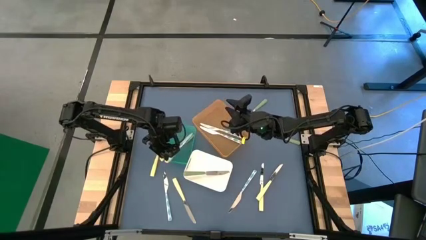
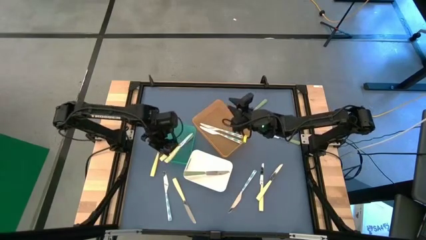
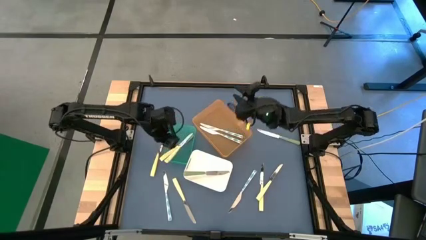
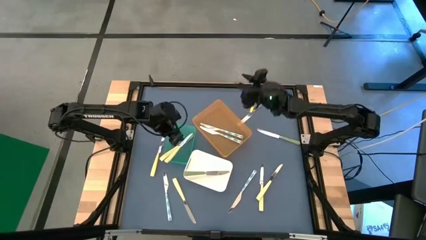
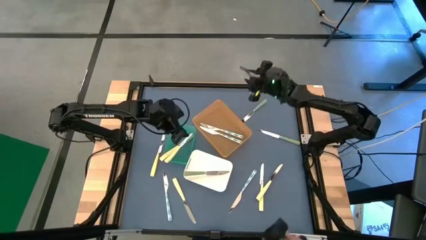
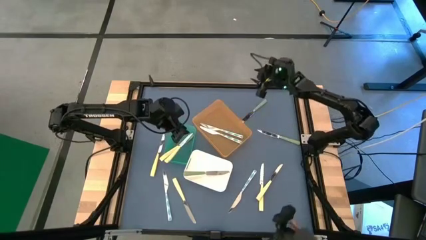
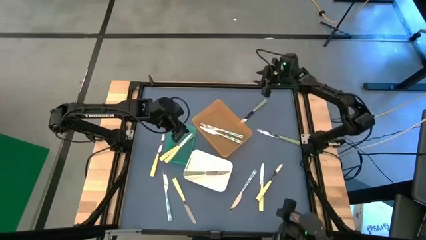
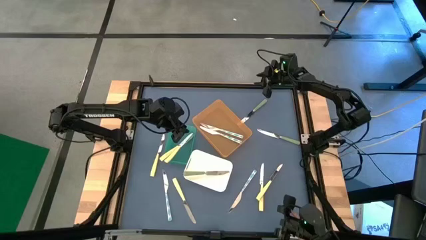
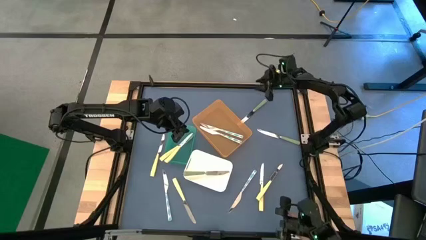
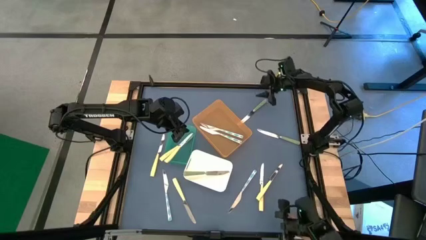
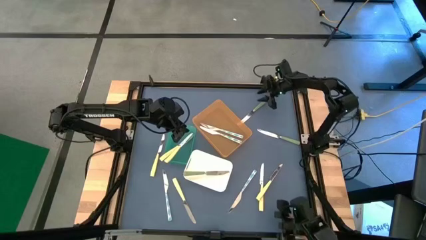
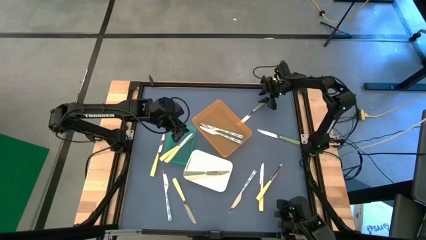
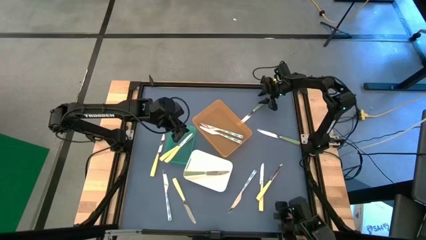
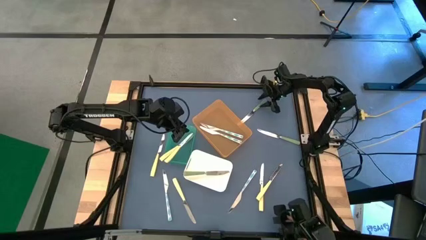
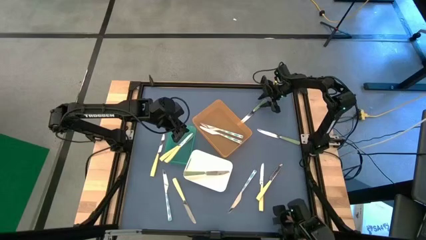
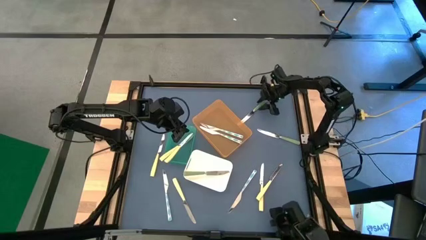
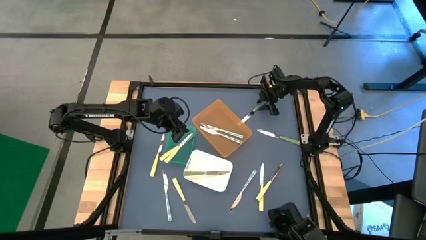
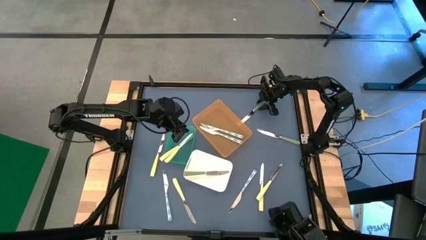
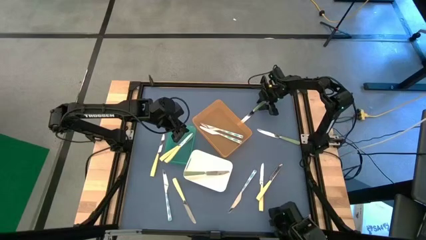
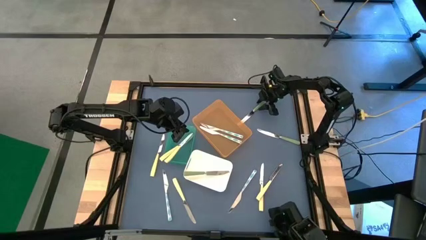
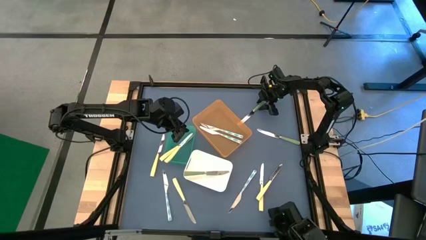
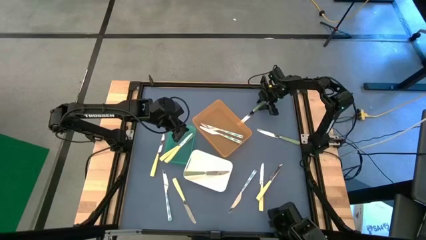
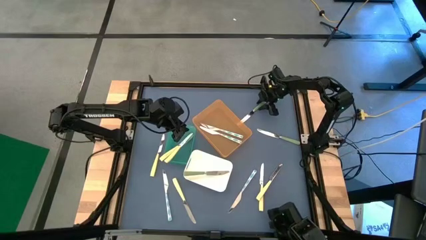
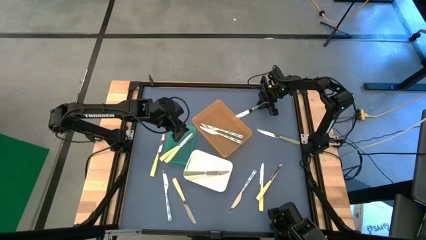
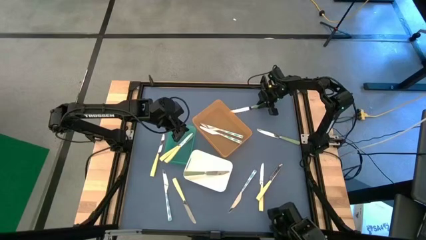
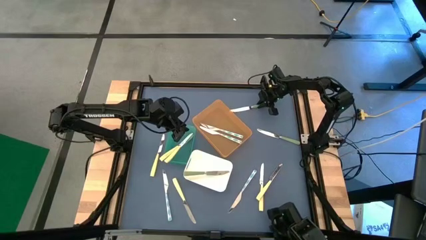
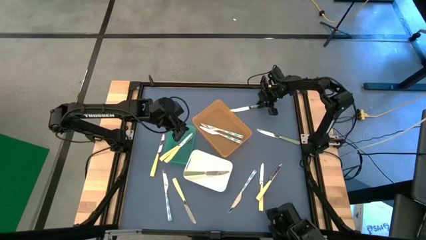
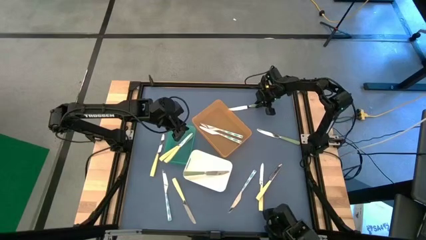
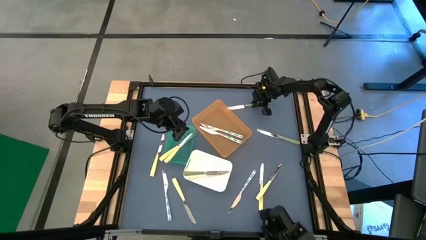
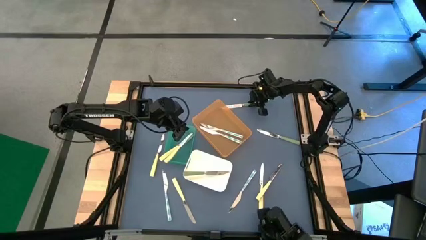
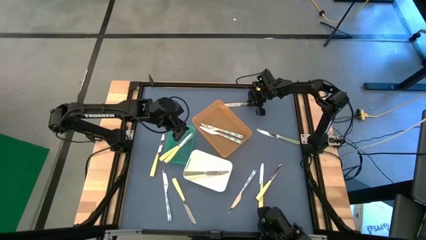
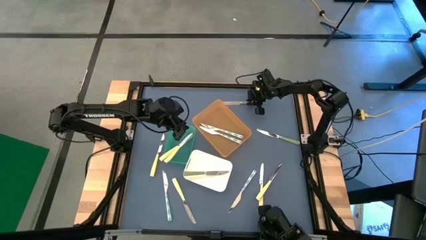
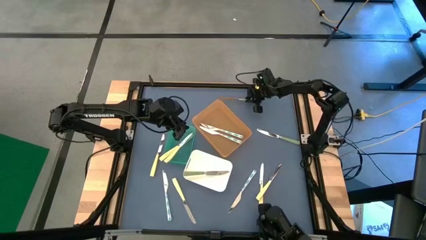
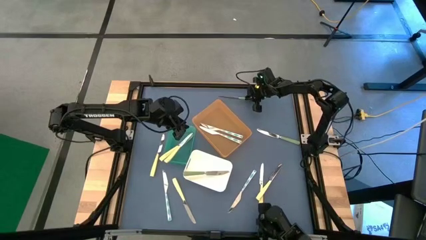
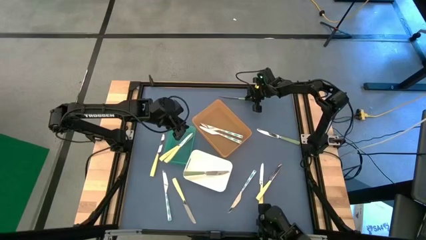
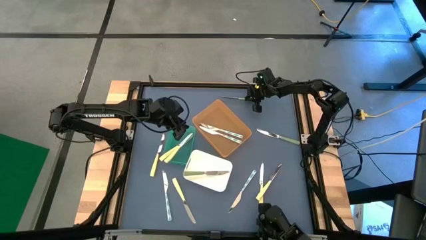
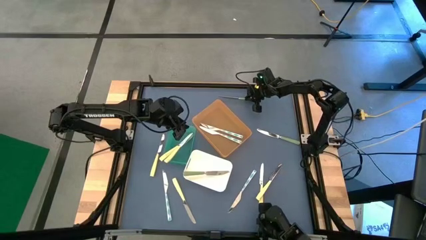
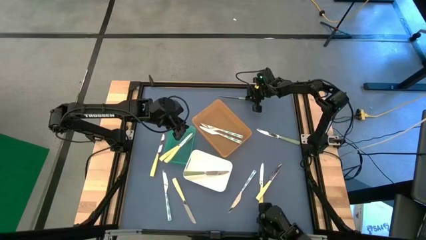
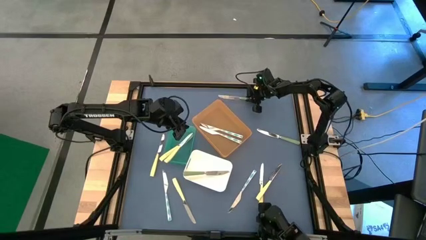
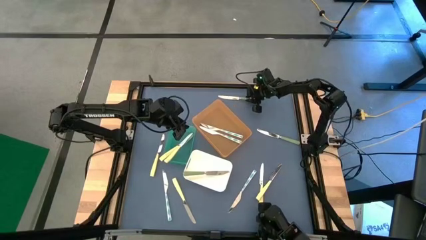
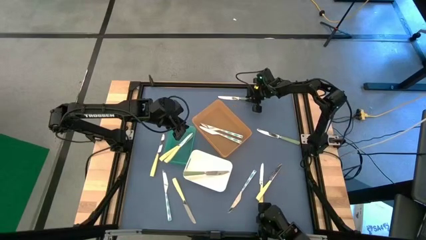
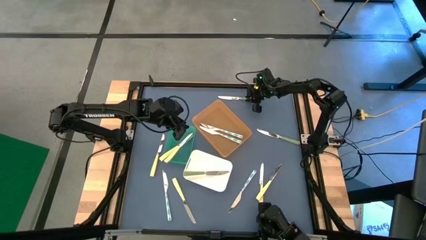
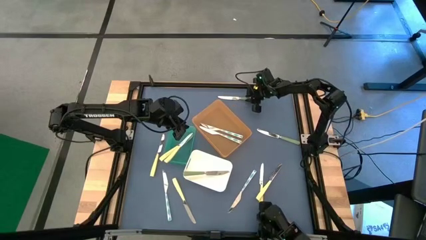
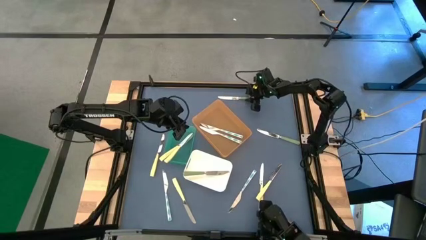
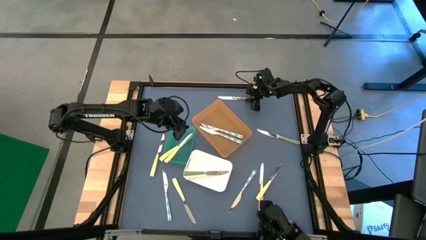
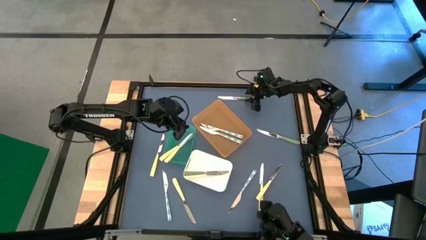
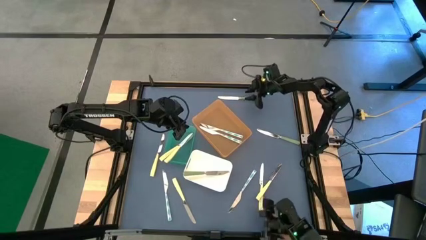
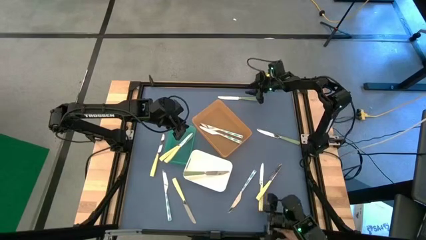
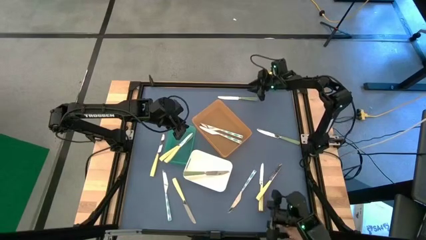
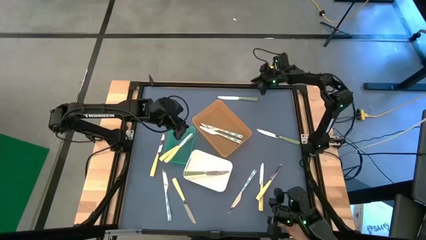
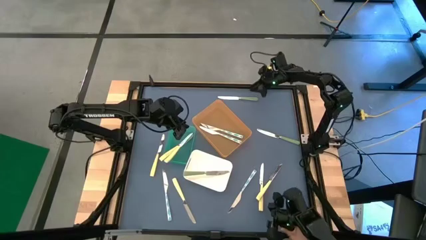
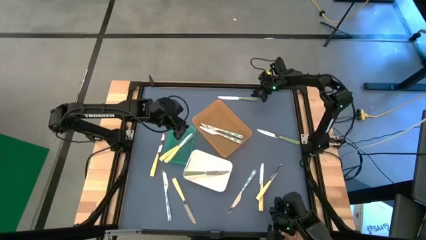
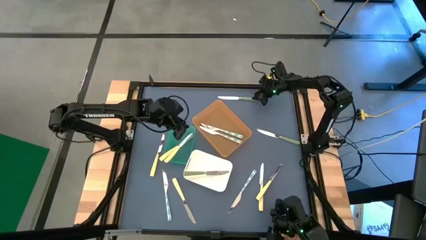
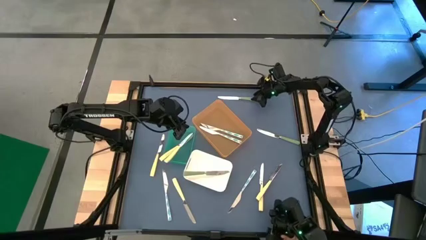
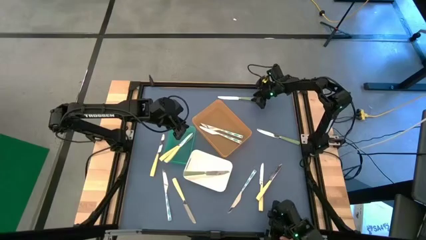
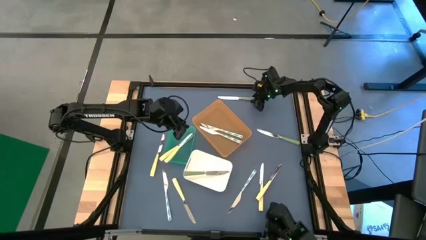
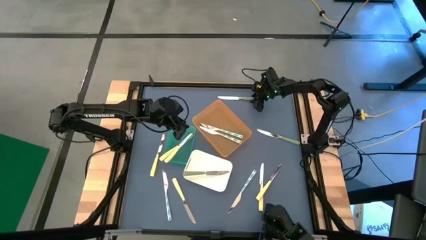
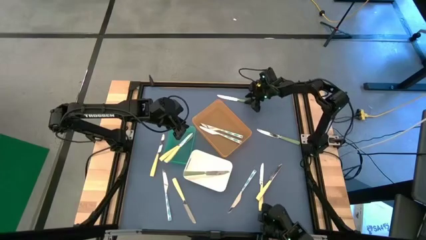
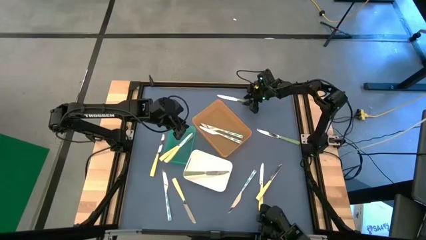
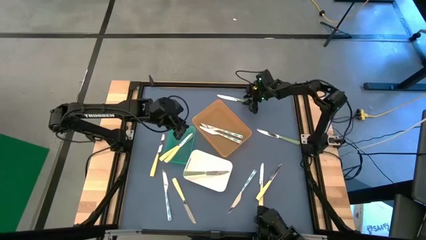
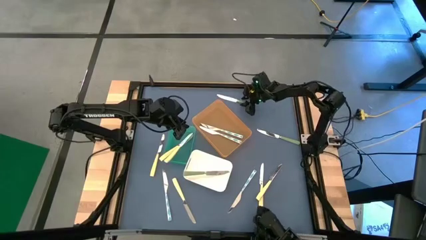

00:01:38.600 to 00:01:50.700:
Task: Sort silverware by color (type)
Put the green table knife into the white bin

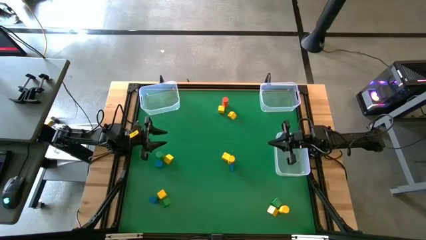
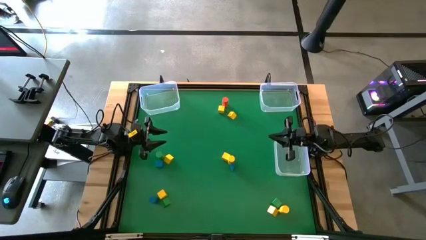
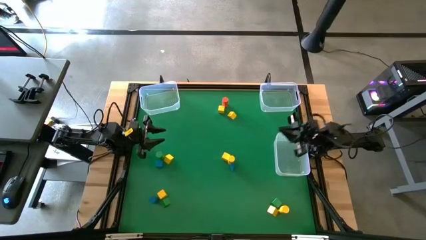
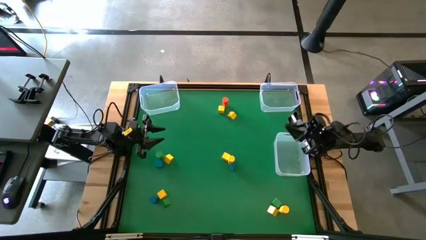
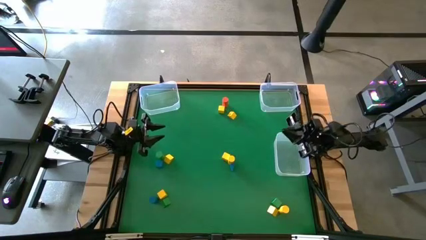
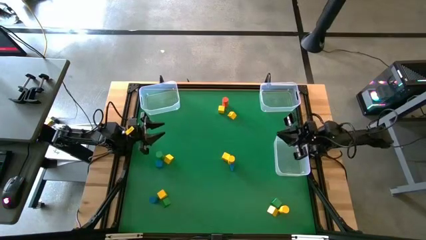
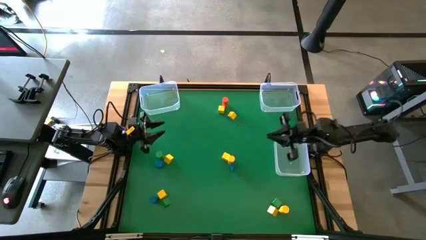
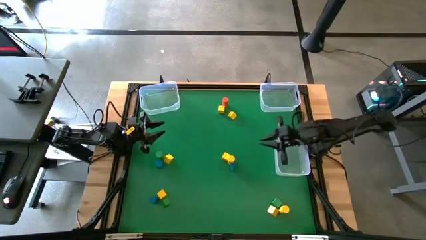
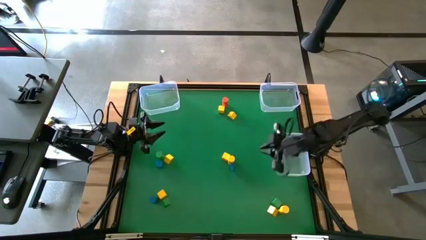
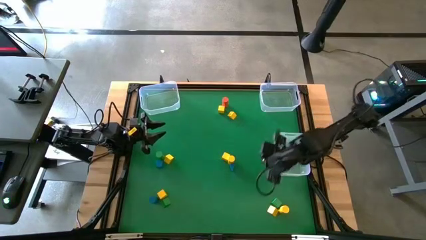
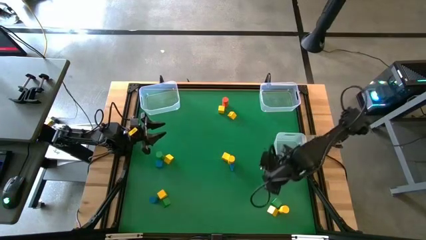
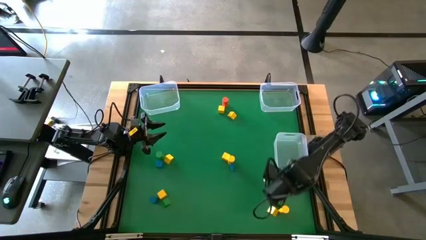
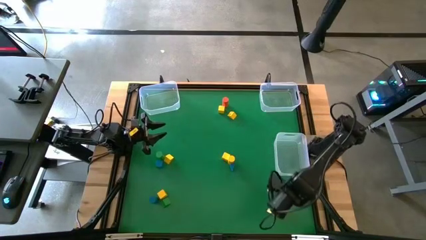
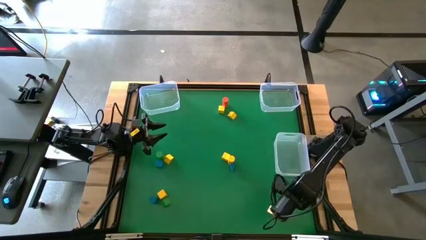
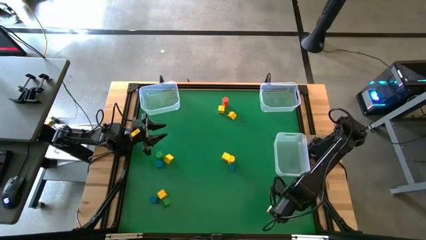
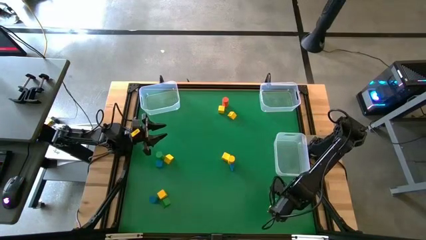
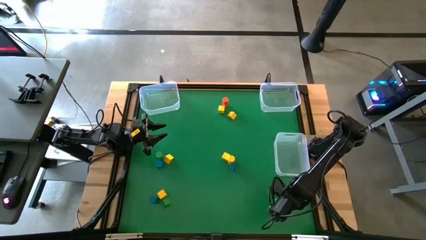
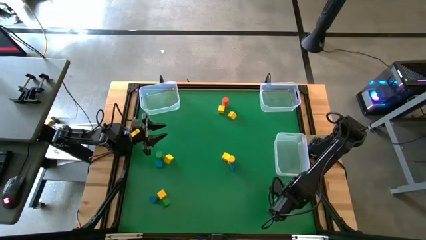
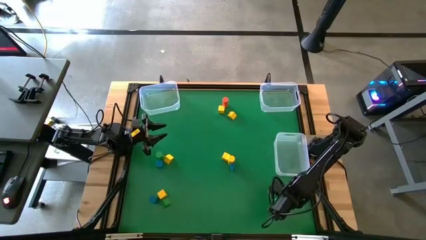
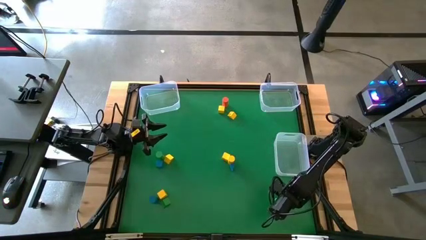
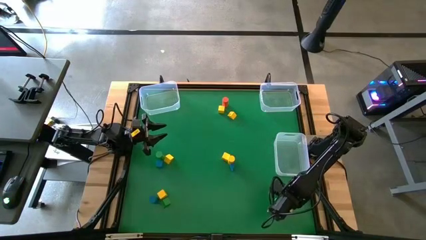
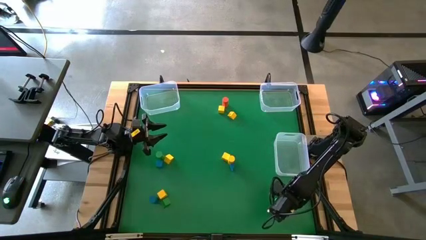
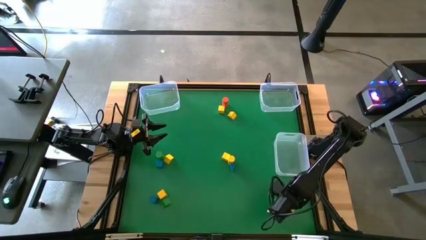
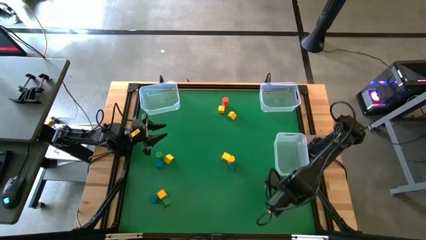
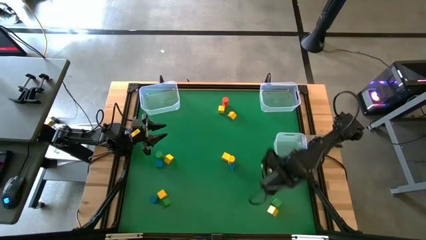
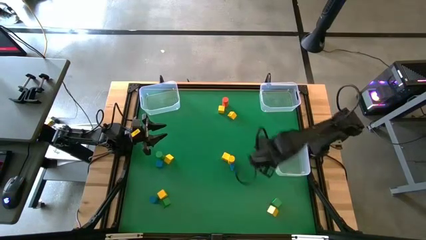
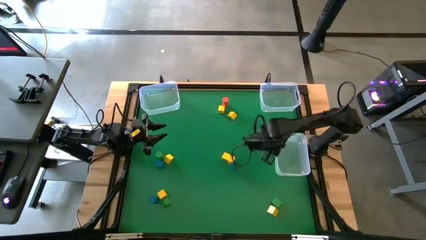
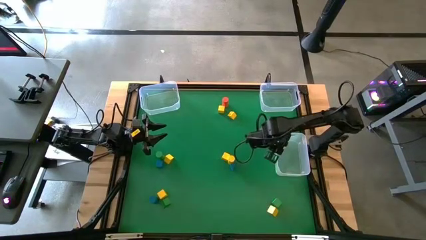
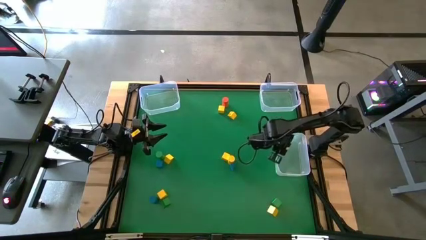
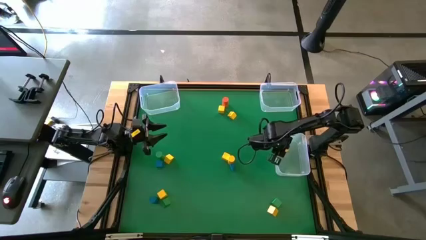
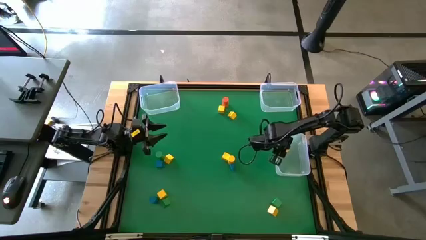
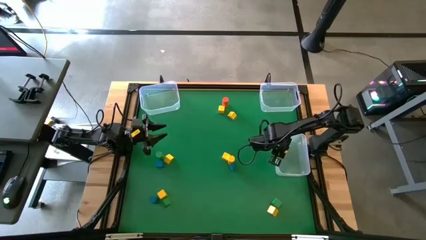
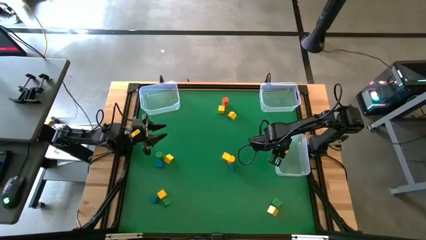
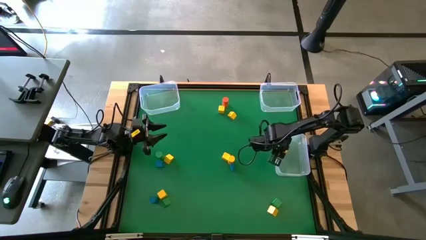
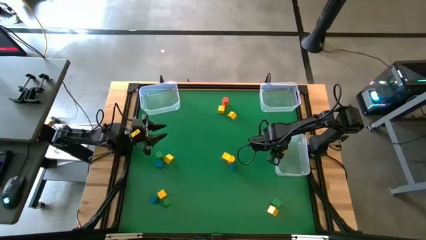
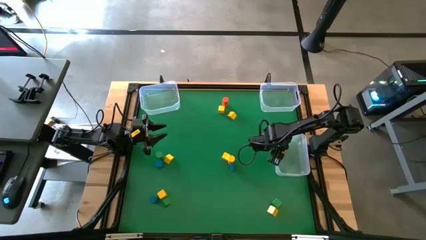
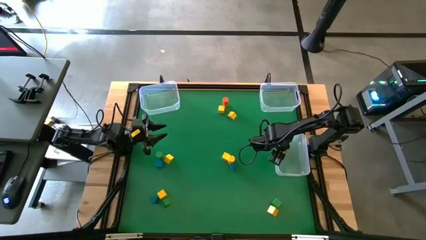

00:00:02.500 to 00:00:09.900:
Task: Sort blocks by size
Put the yellow cylindrical block into the bottom transparent bin
